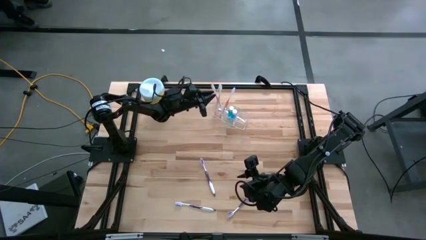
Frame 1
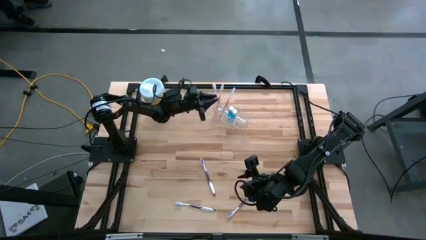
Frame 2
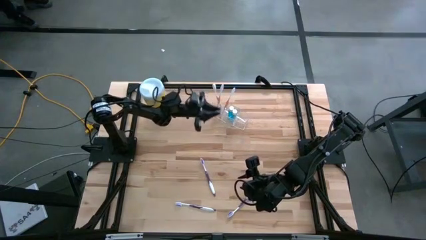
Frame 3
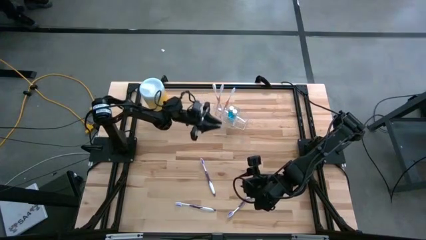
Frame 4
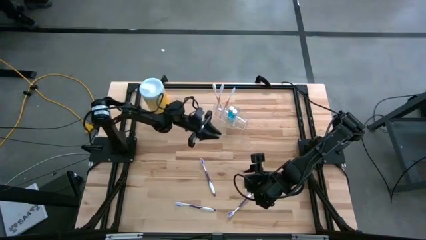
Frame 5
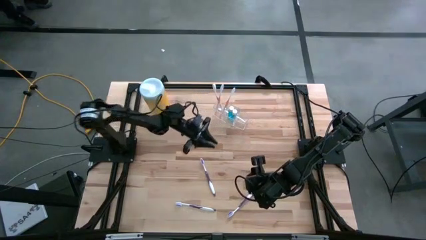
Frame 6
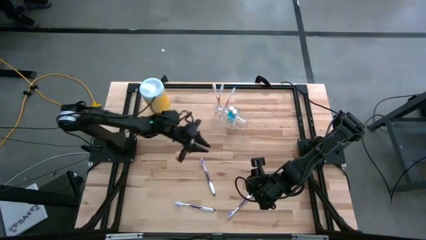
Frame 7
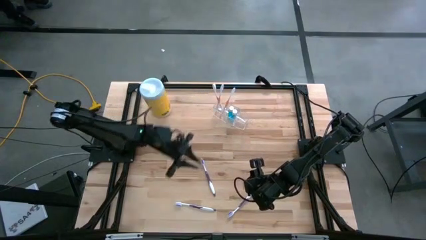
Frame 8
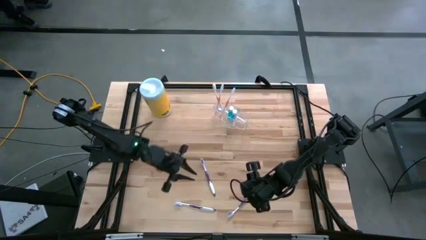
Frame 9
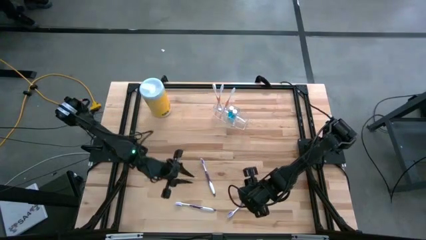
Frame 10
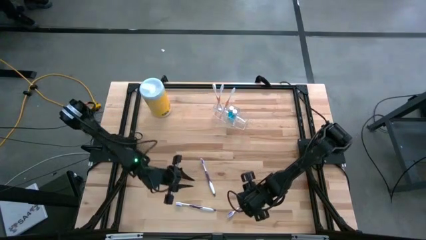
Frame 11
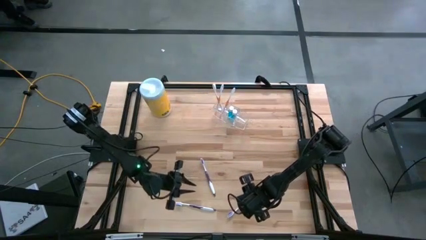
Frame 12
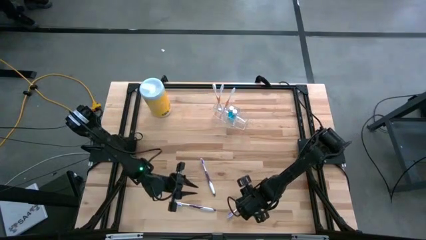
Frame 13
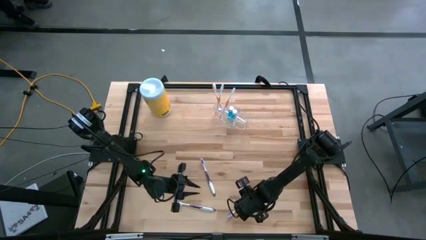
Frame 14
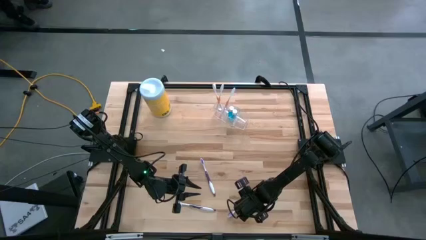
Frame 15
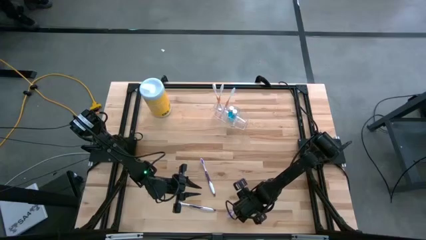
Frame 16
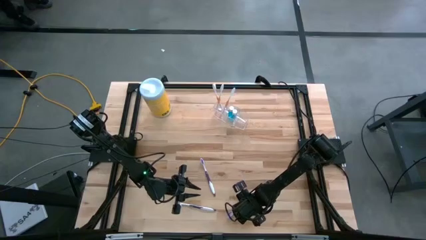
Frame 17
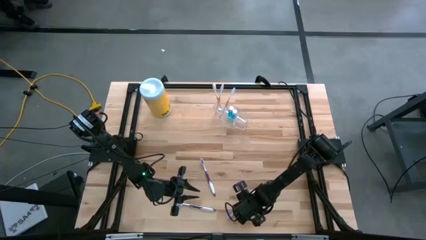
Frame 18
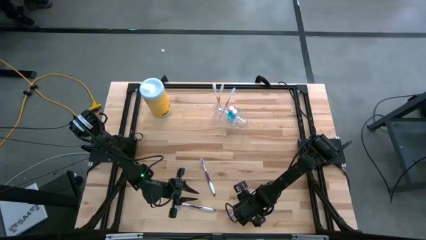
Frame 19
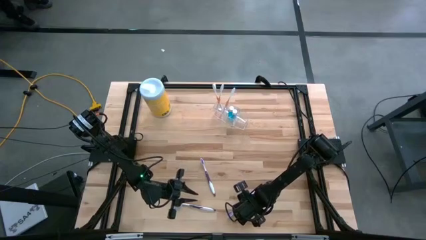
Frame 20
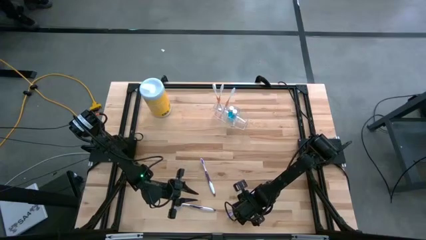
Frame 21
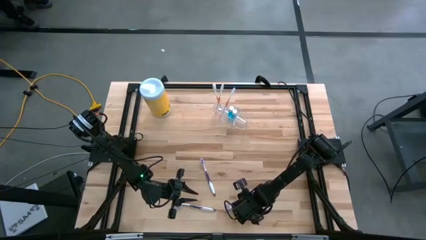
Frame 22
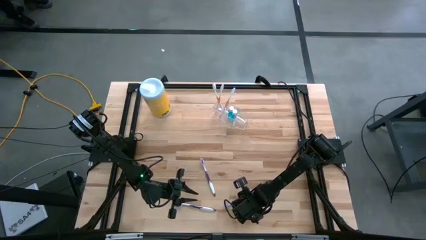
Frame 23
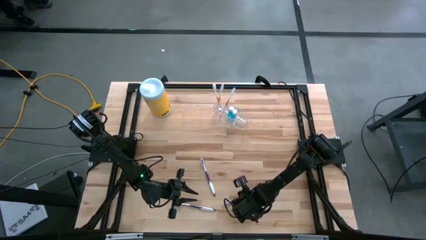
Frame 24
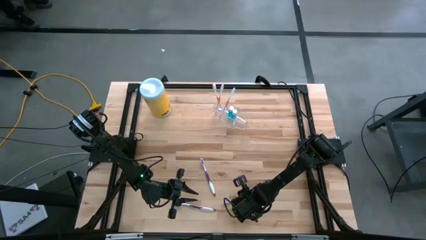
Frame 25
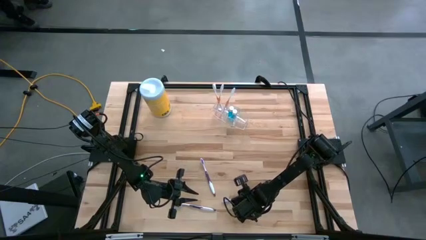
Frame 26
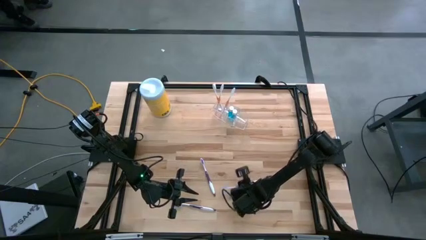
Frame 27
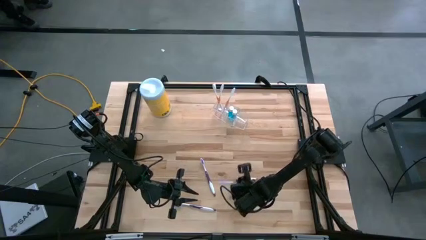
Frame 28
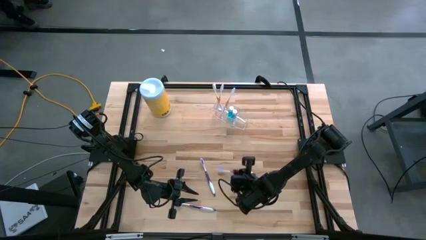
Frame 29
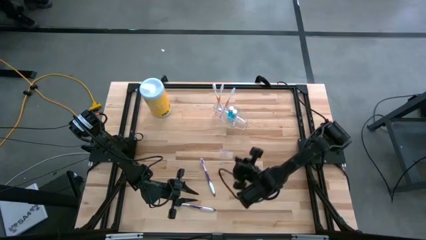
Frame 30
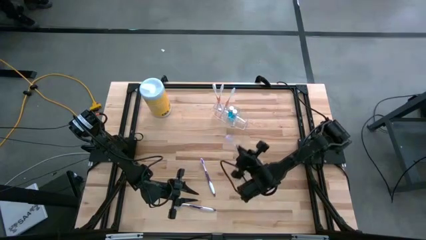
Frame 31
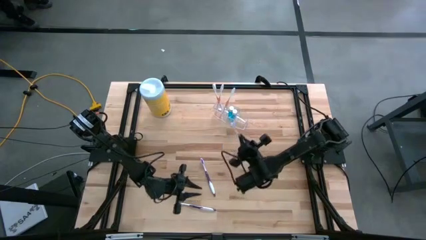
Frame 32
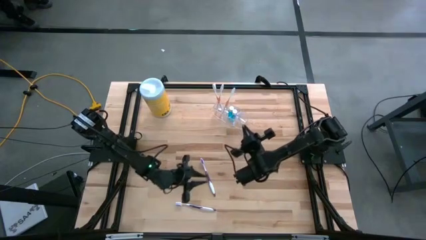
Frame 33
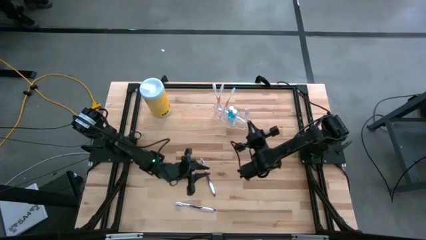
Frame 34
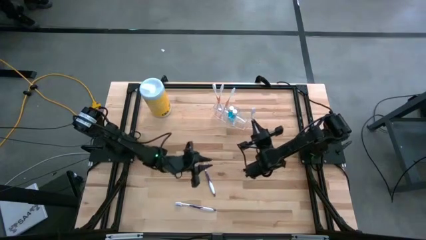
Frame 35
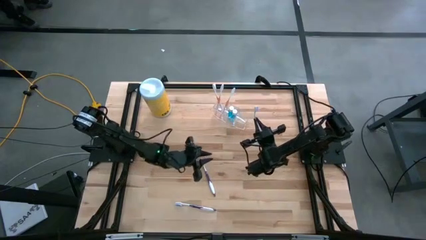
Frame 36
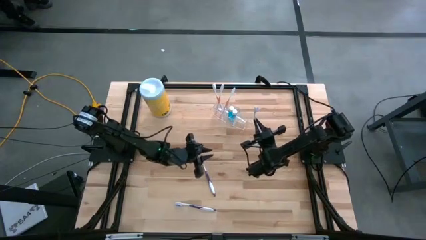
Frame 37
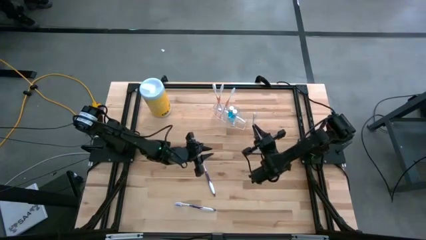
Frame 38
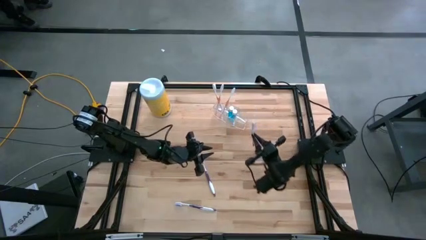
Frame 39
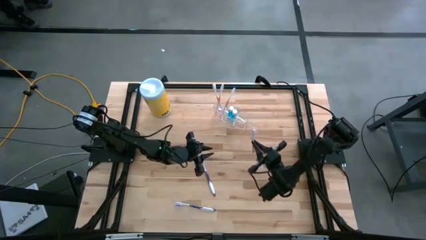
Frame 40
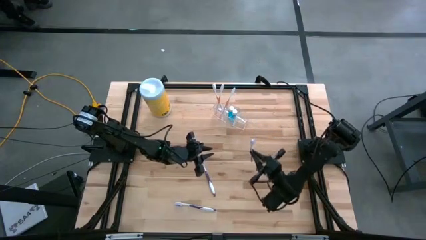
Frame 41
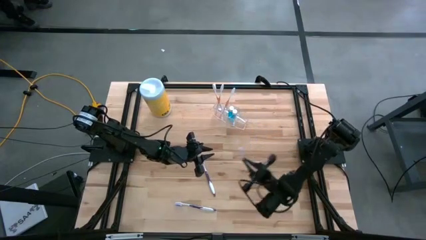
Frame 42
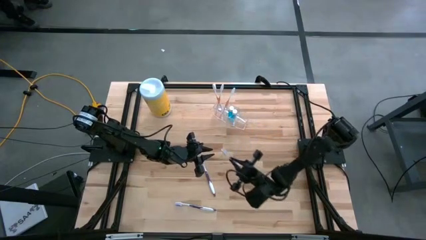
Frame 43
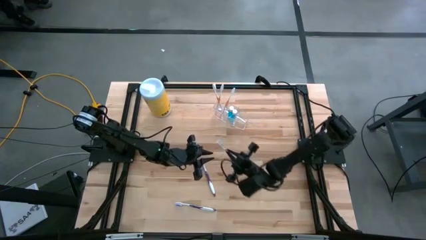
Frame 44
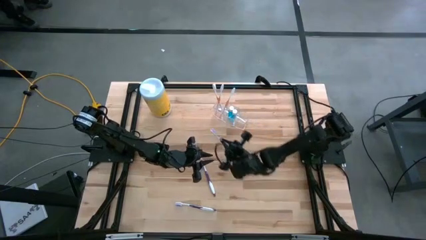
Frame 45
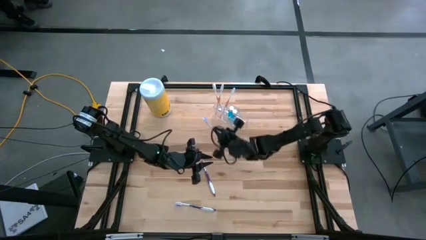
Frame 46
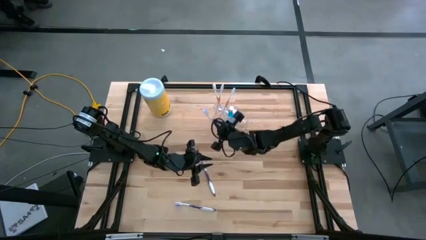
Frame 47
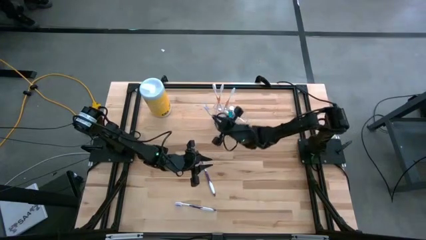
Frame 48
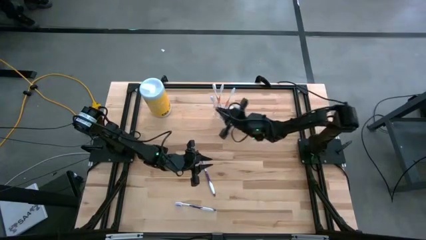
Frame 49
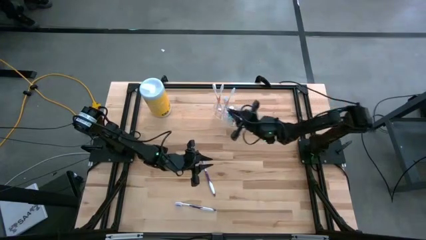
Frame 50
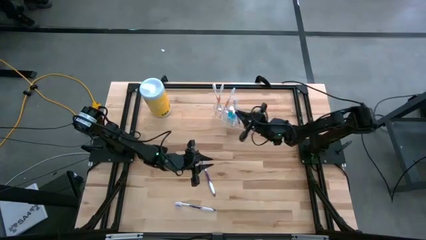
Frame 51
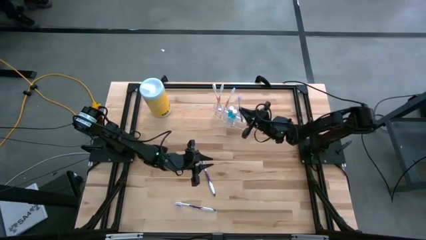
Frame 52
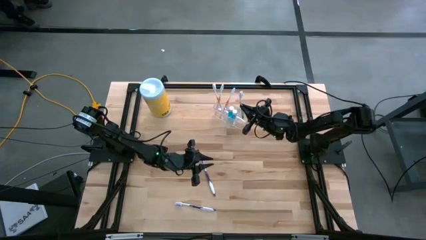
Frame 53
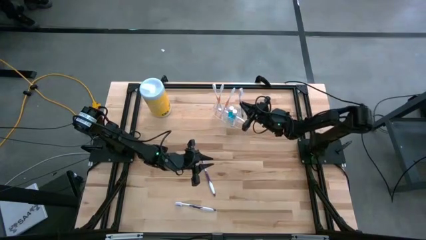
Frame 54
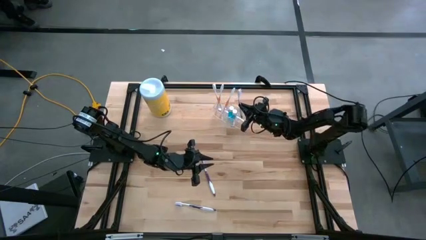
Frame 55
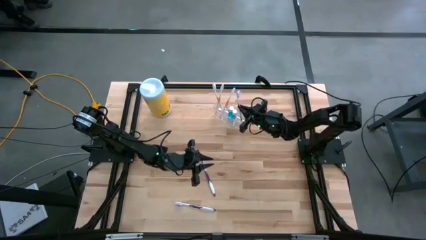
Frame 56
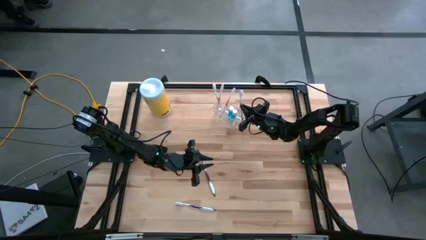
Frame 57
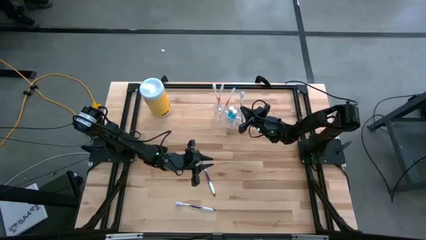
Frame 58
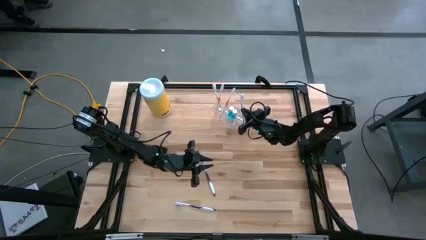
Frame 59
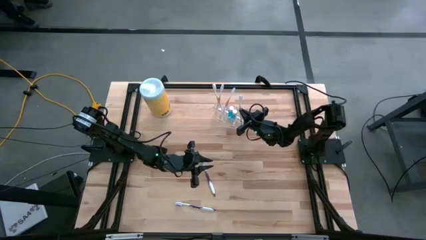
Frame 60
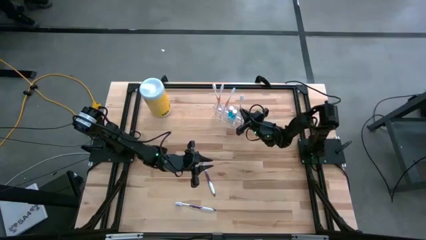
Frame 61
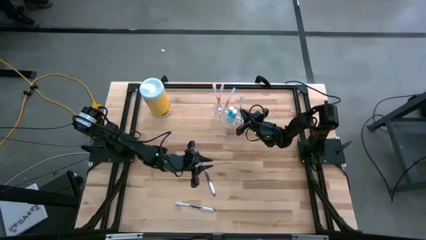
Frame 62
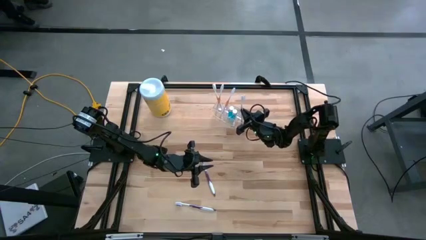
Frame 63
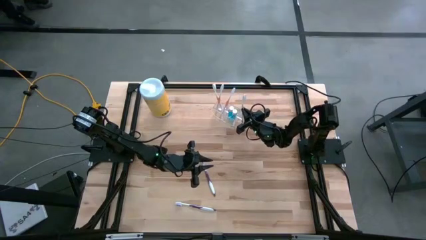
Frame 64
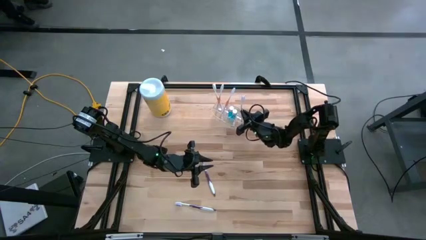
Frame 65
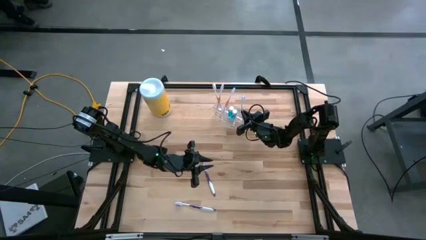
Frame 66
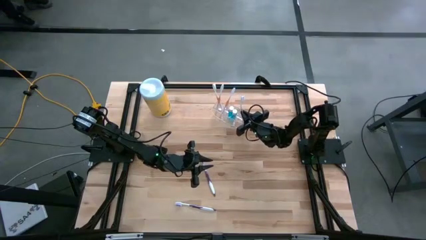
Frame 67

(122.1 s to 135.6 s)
Task: Pick & Place toothbrushing station
Put the bottom right purple toothbrush into the transparent organizer
